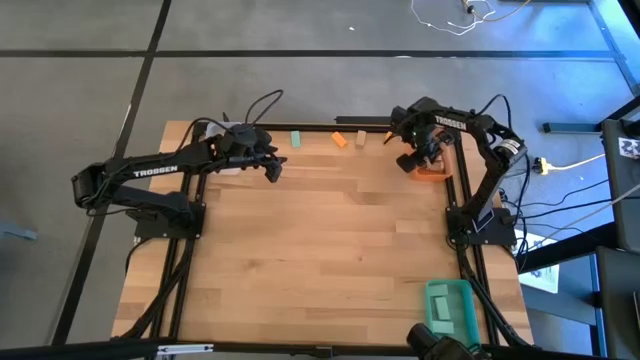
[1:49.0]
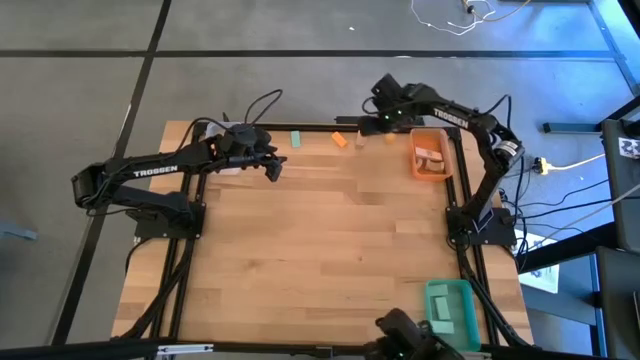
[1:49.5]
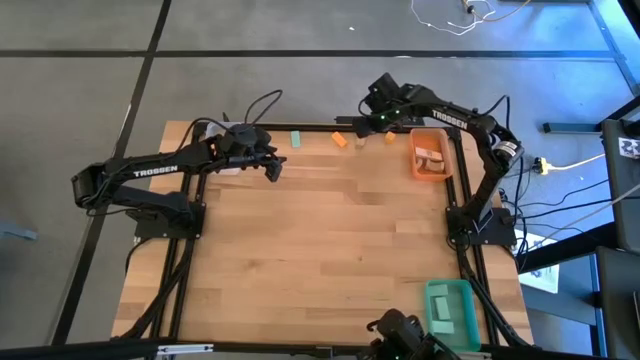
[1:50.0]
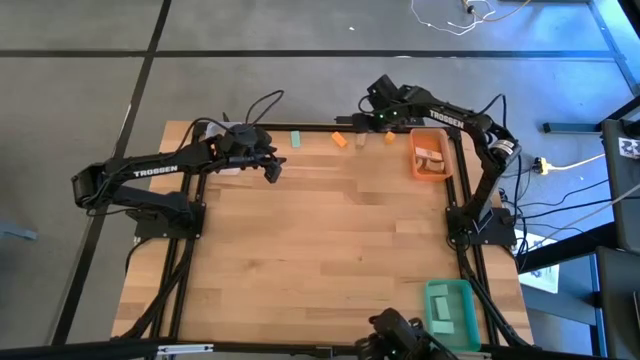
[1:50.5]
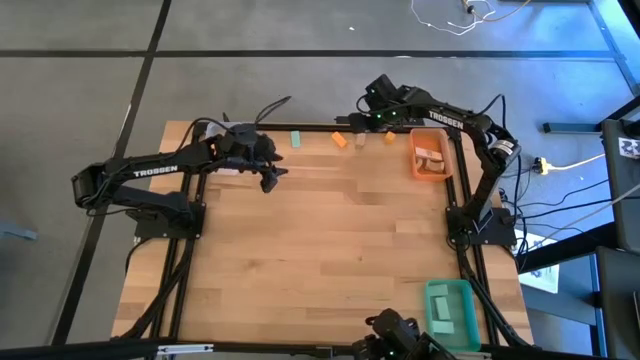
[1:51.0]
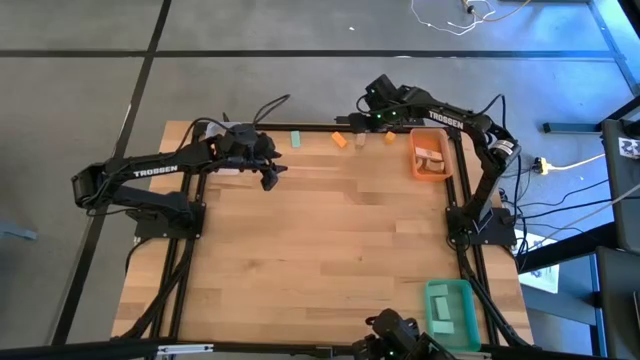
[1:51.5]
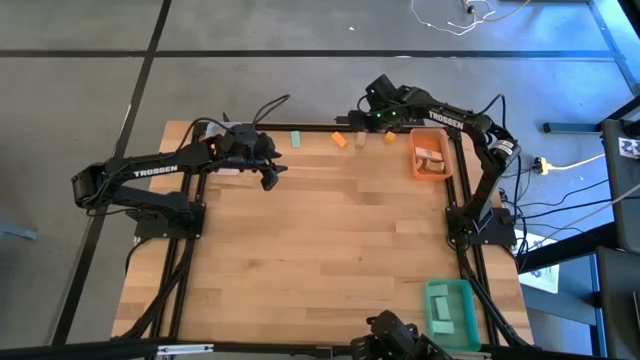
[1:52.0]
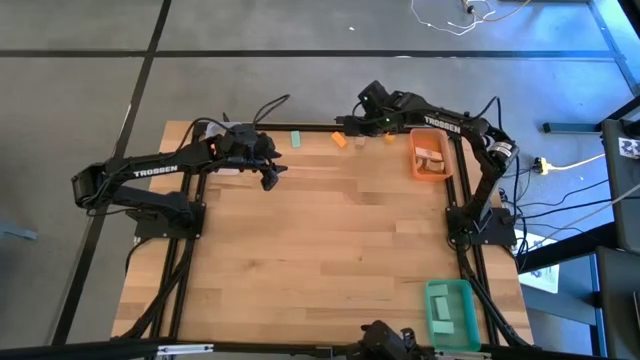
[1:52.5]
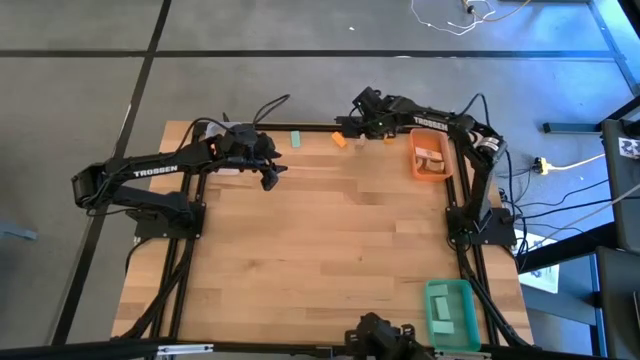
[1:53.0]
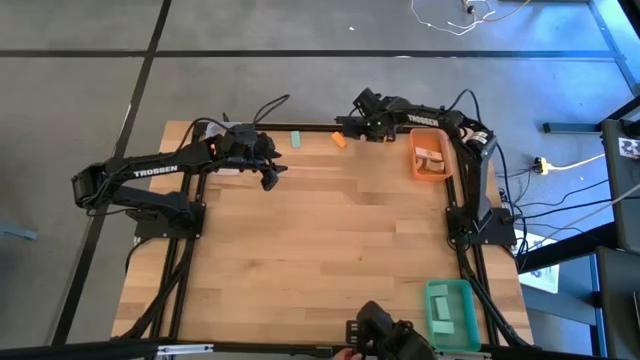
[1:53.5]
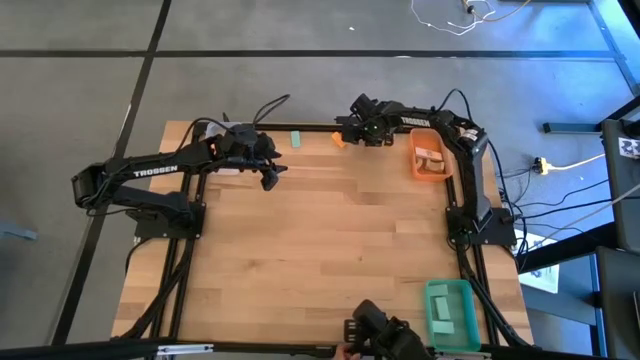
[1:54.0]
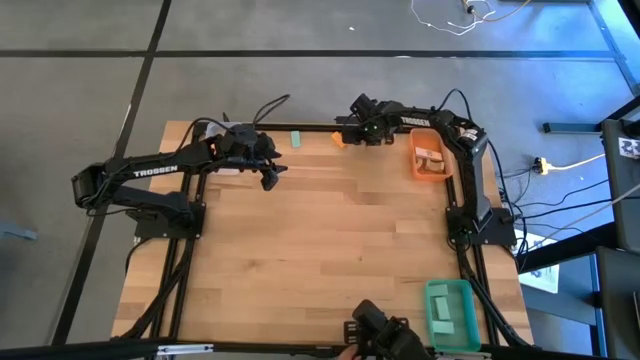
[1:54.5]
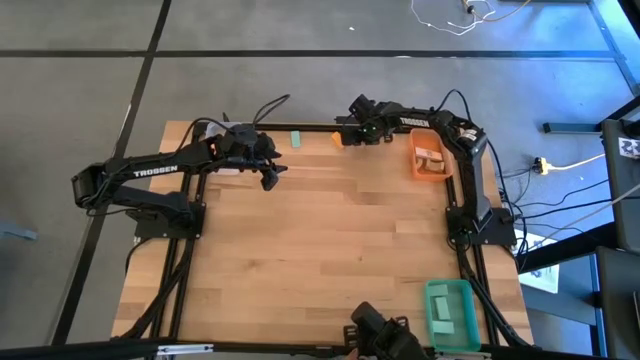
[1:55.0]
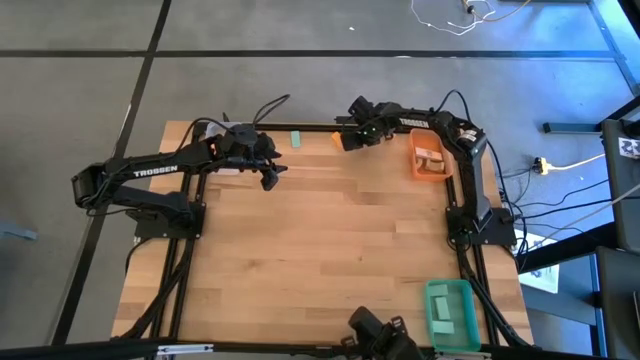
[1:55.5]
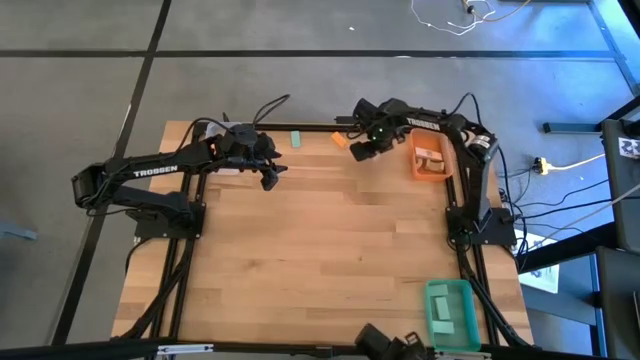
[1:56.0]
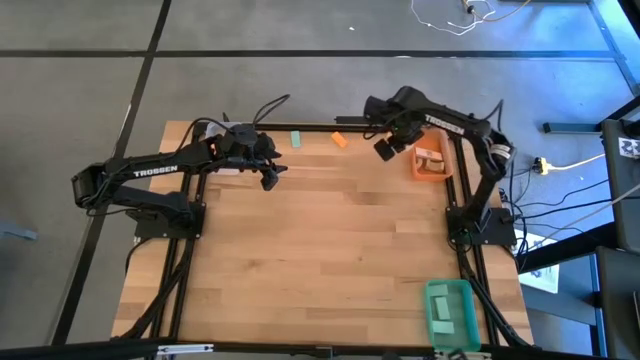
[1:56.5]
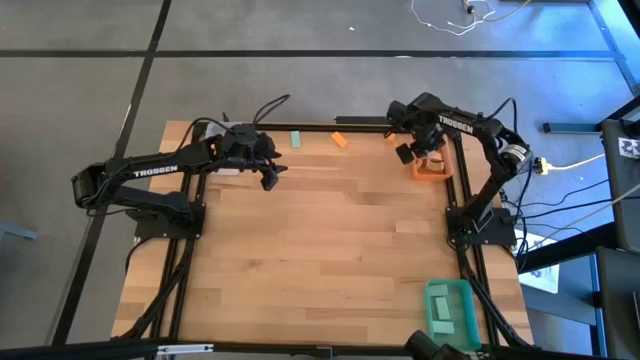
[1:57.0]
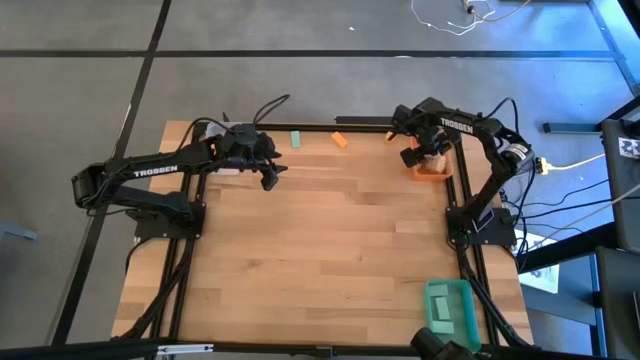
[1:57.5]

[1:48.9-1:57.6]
Task: Sort & place blocks by color
Put the brown block into the orange bin

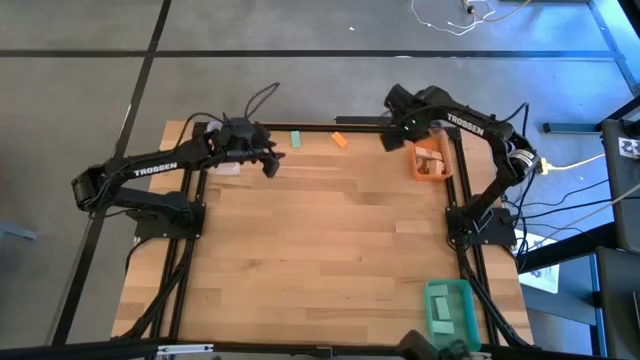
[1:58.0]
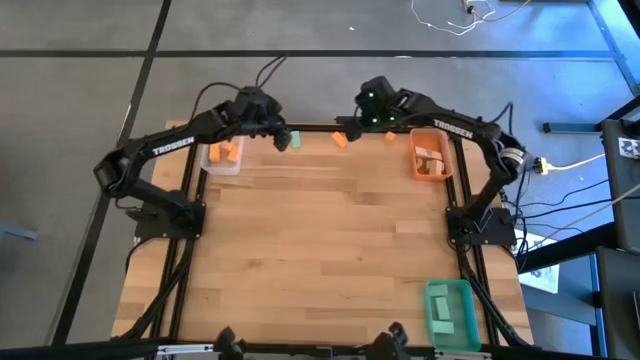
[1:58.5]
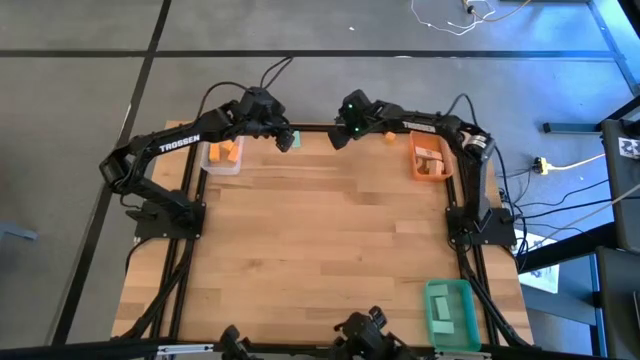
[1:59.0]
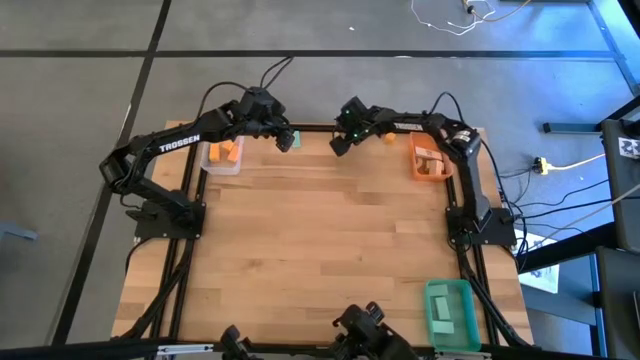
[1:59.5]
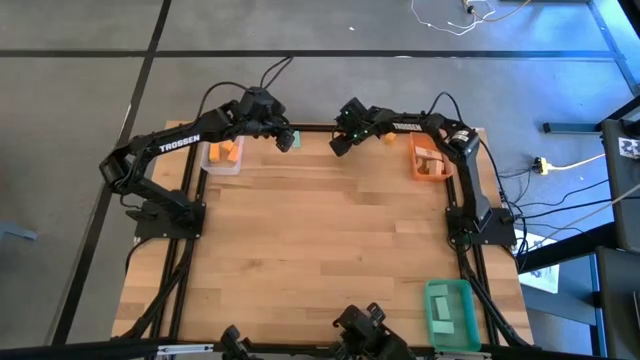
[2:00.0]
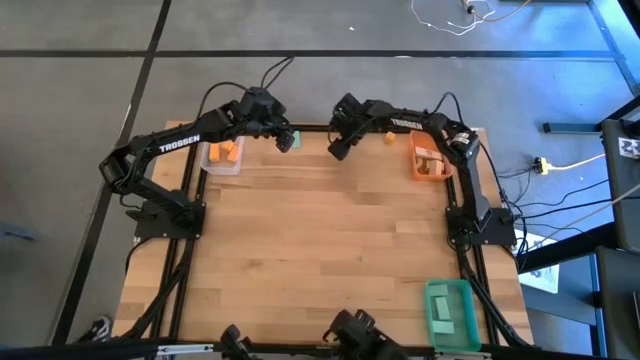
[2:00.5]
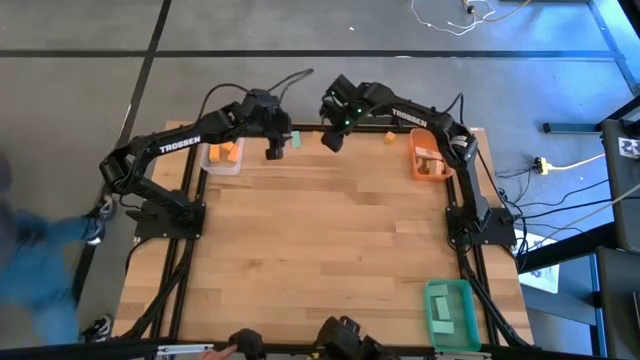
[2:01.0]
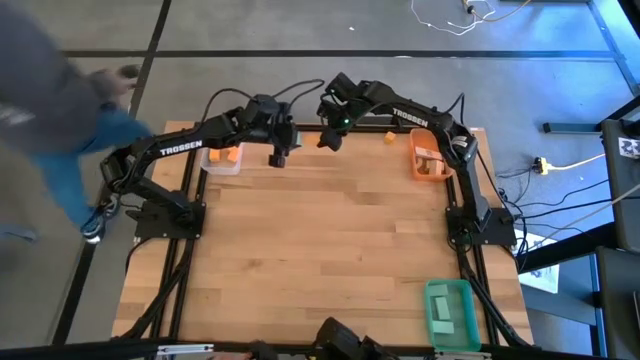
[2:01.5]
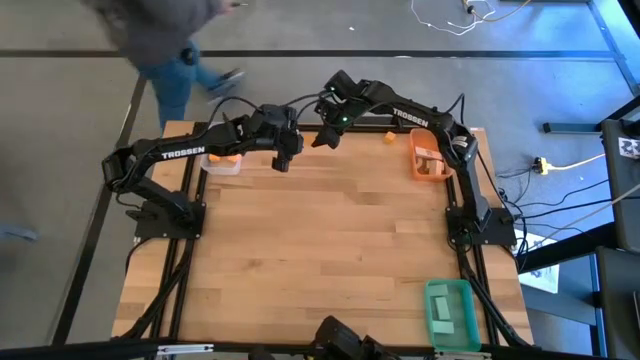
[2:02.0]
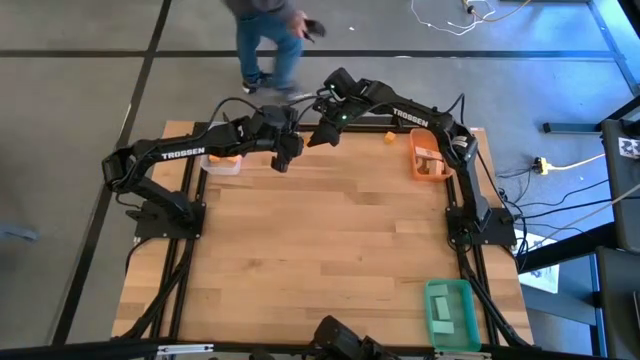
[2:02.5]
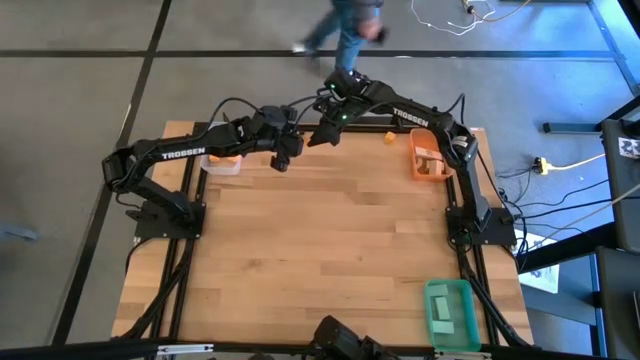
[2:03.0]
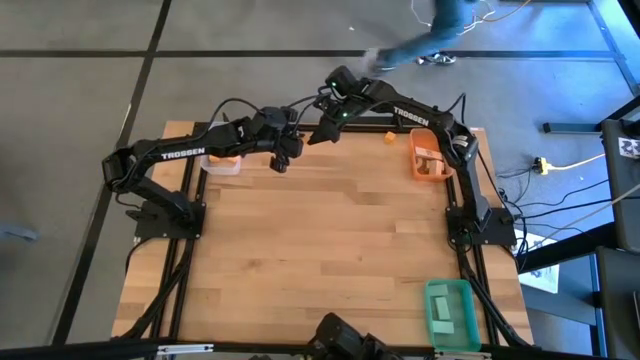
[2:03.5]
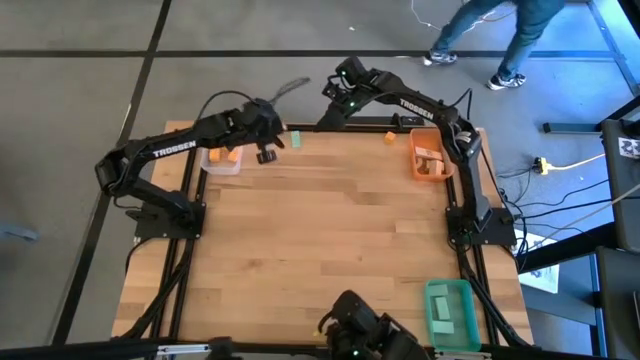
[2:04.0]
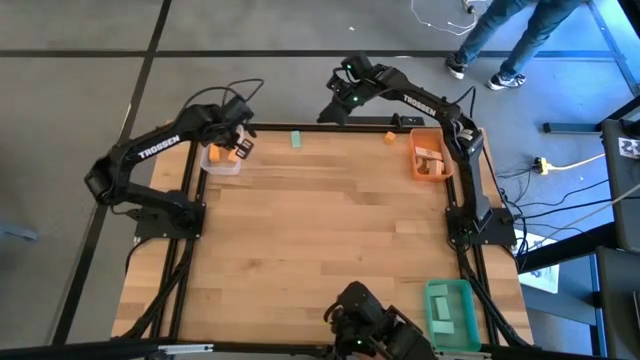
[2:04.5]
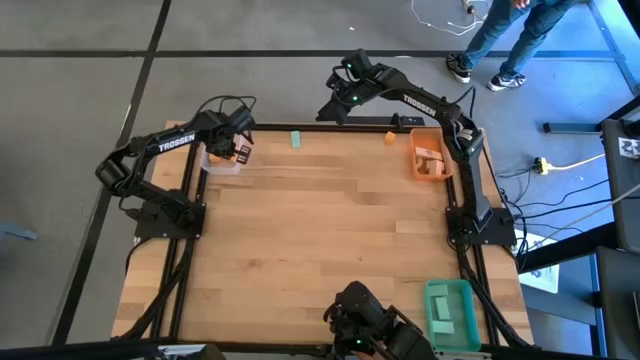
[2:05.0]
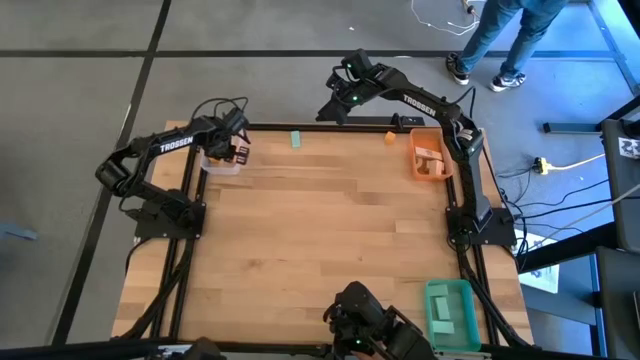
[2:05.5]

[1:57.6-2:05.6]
Put the orange block into the transparent bin

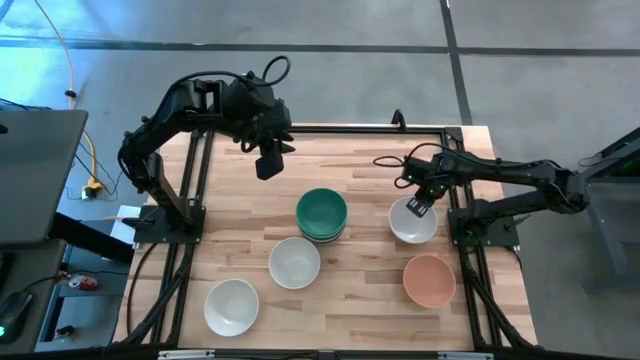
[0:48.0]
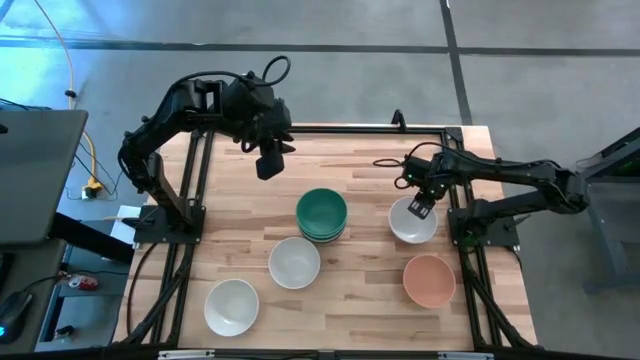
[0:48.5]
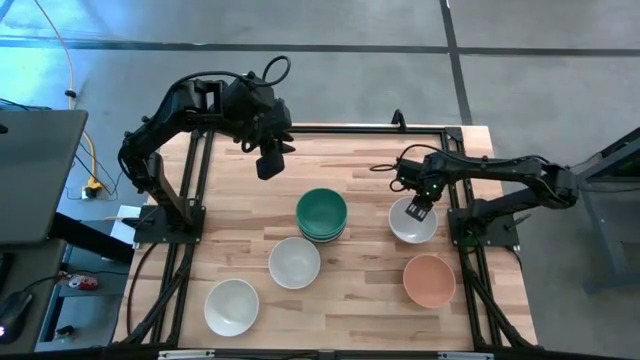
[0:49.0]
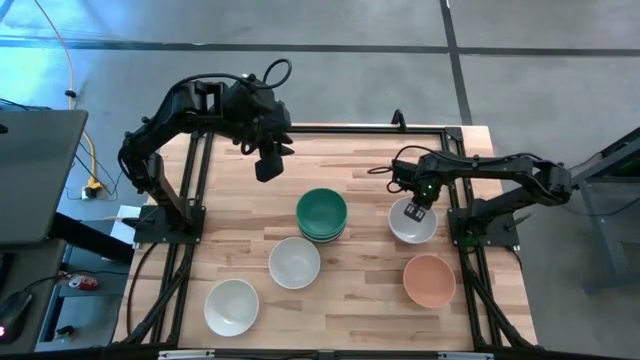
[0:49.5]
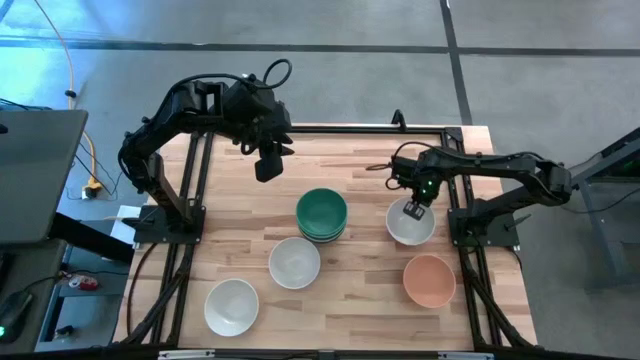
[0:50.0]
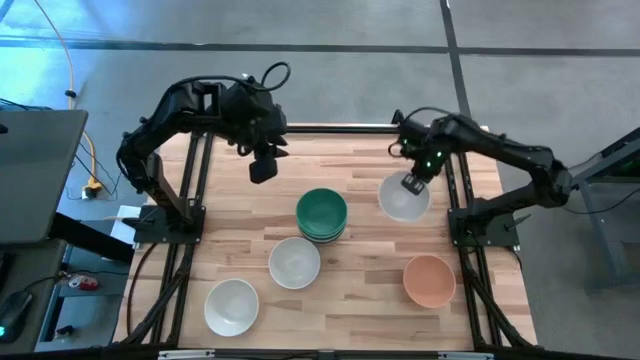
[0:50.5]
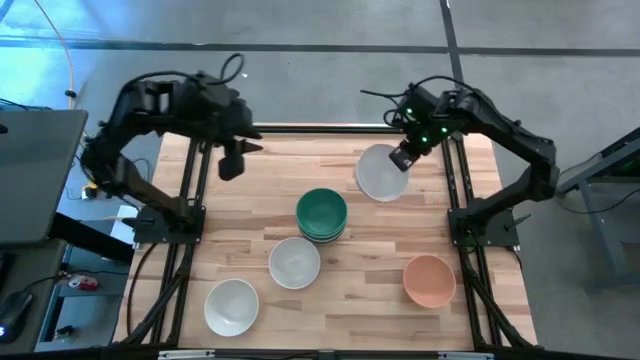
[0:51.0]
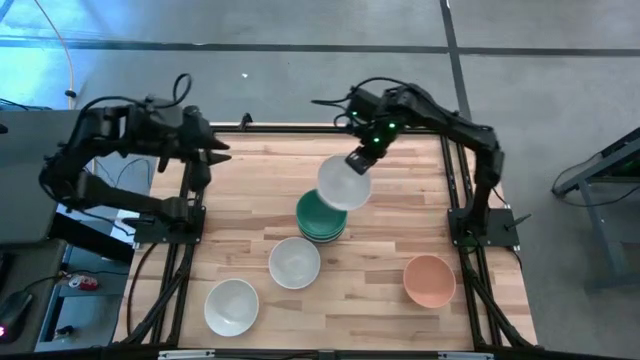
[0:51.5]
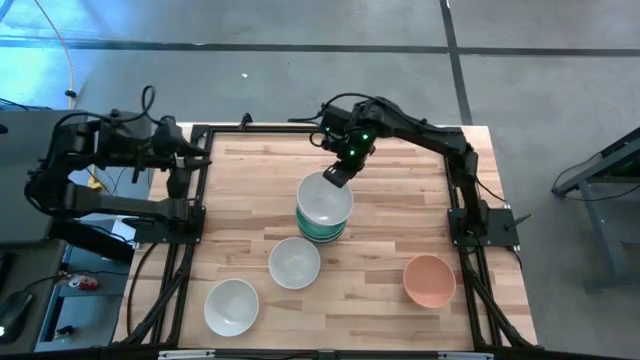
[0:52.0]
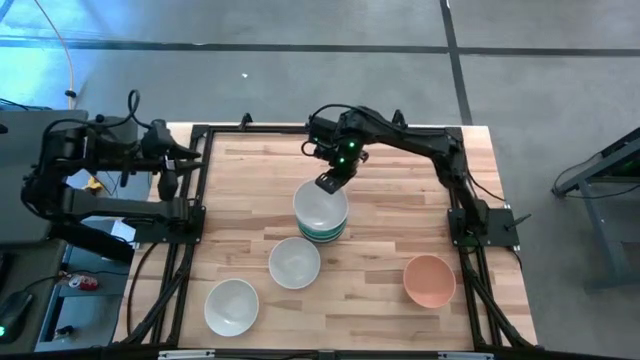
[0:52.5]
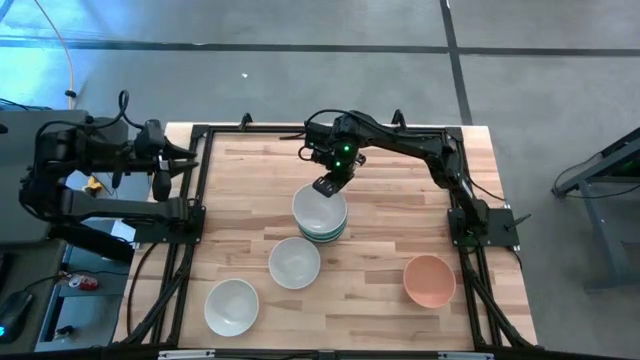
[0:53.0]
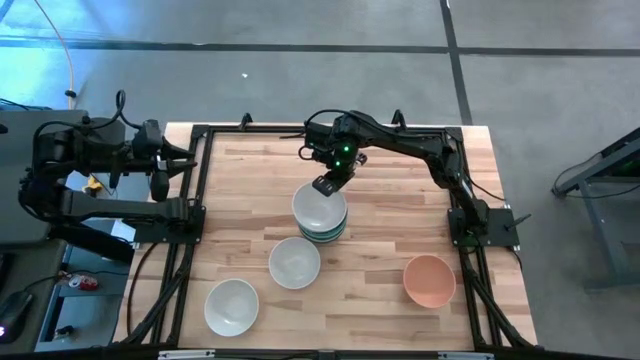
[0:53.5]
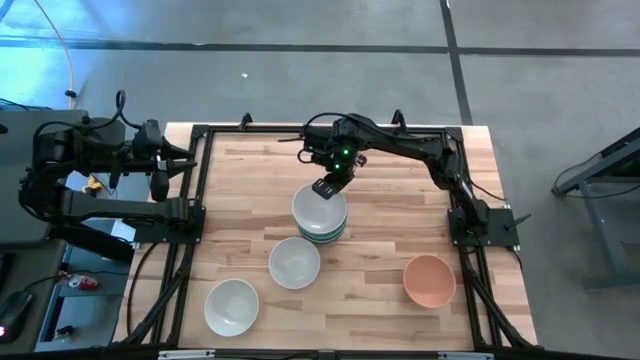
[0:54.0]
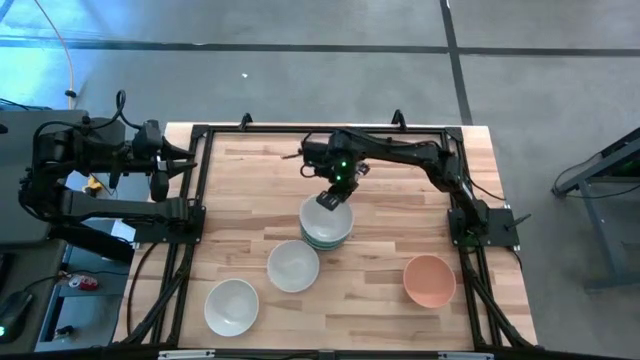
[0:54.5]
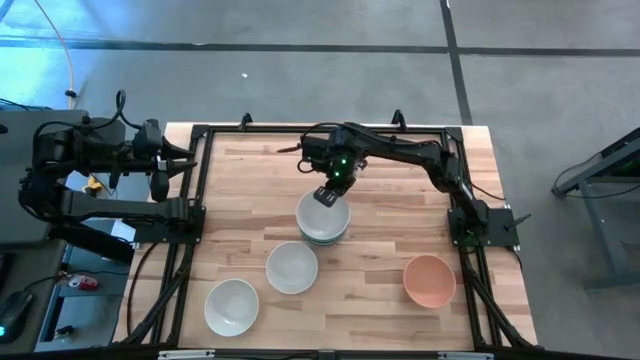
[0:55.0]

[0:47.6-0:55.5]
Task: Nest bowls inside each other
Stack the top right white bowl on top of the green bowl
